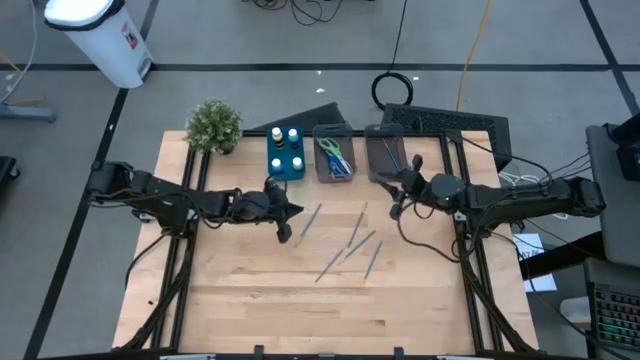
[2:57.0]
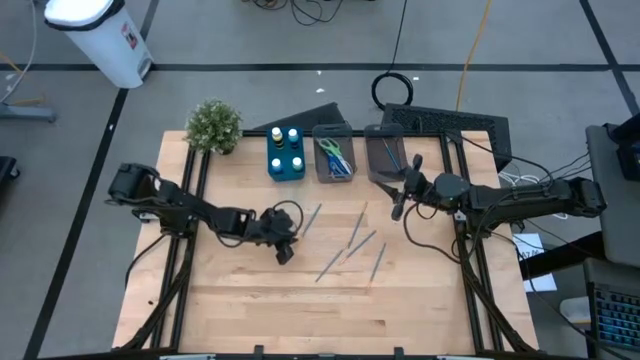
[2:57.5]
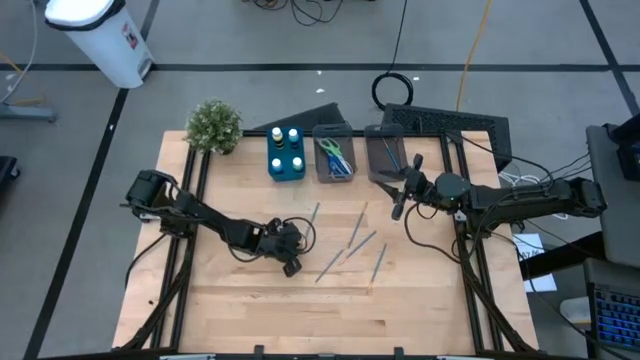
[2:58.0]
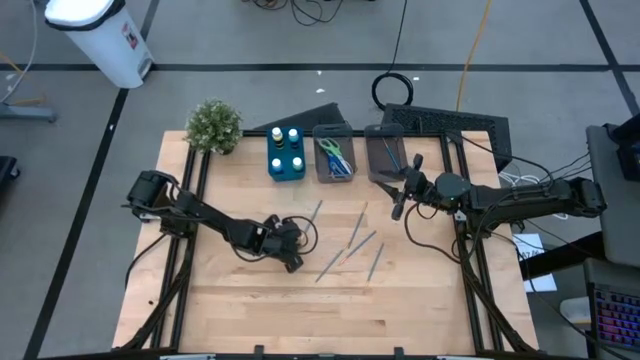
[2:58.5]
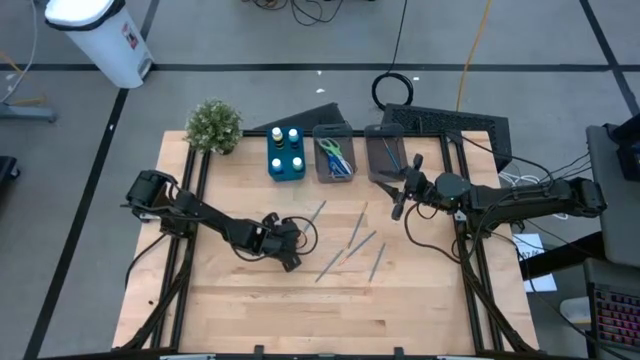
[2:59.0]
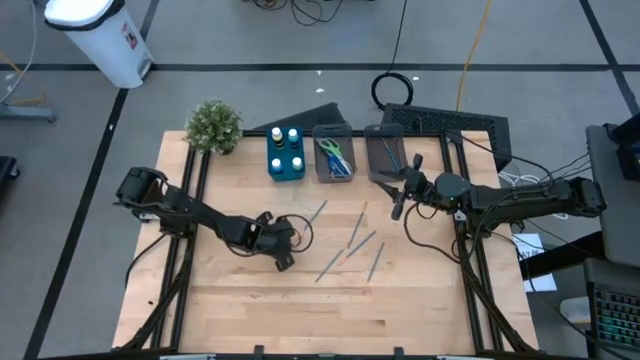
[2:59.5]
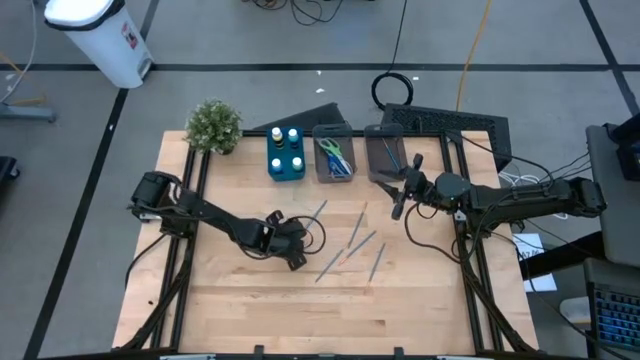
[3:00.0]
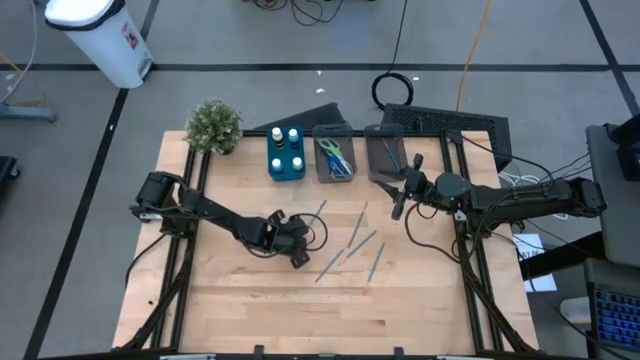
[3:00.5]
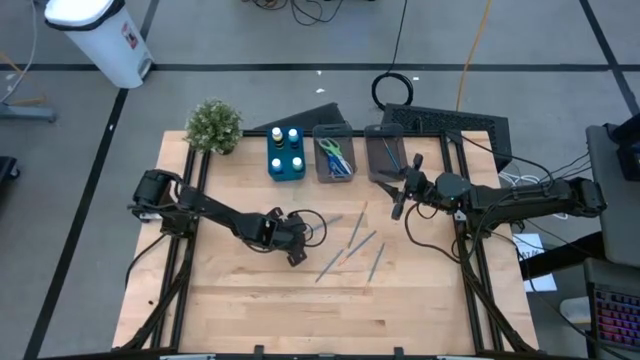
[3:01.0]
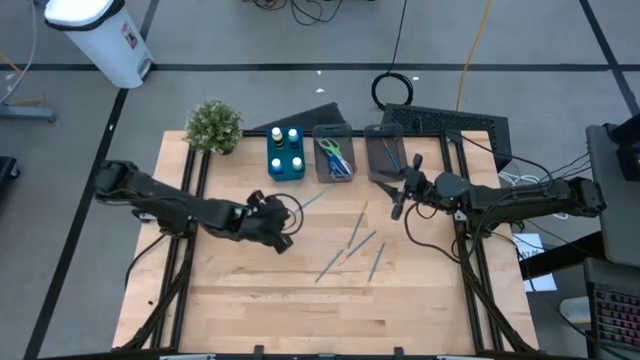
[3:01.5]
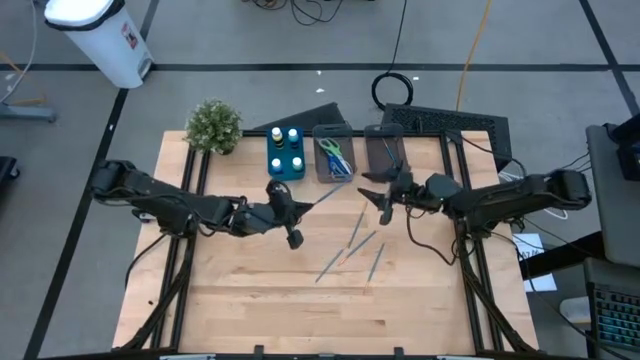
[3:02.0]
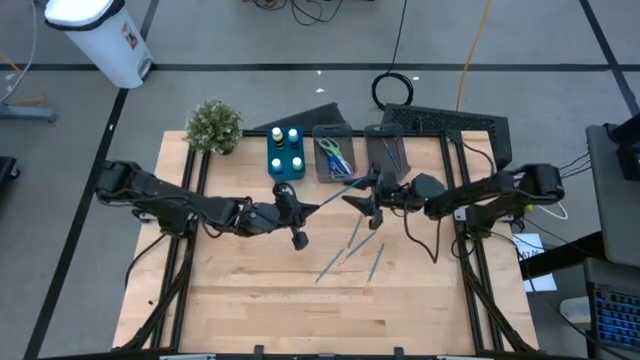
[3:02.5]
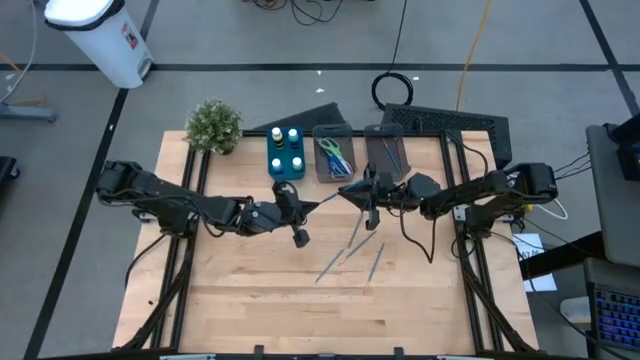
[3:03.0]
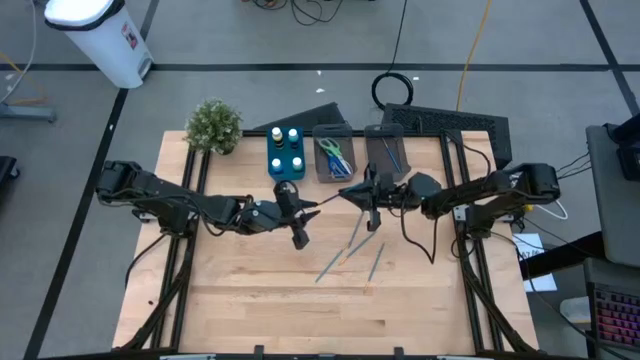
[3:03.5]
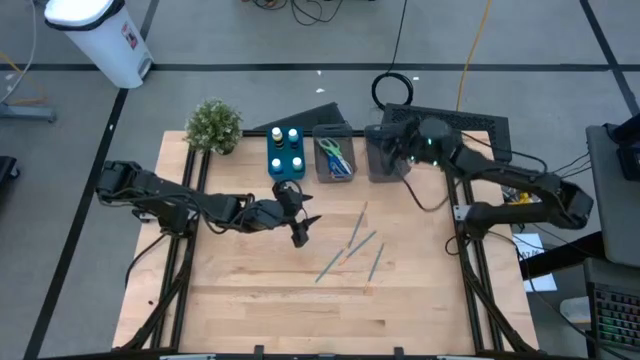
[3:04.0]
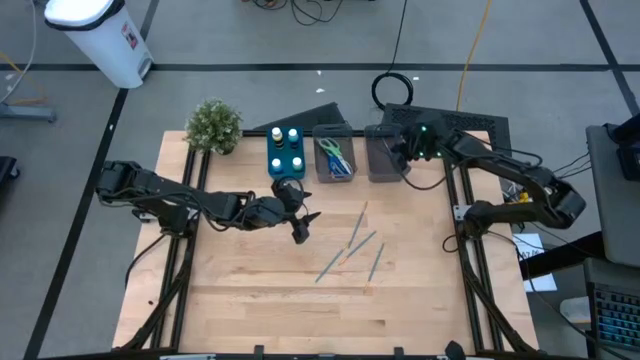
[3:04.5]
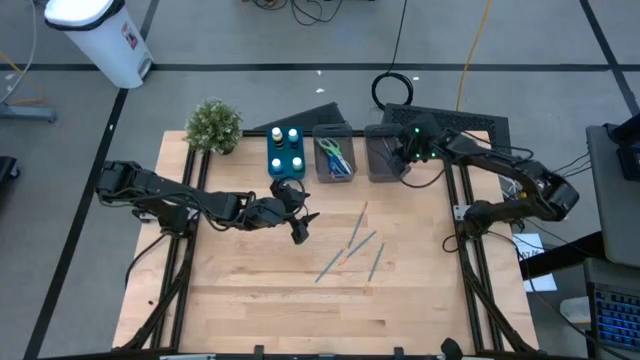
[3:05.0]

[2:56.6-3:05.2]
Task: Pick & Place Paint Supplies
Put the blue paint brush into the right black bin

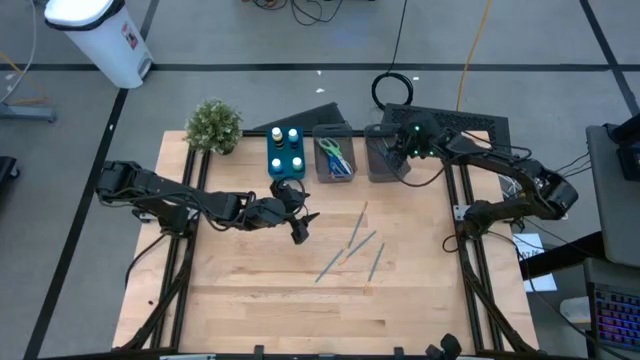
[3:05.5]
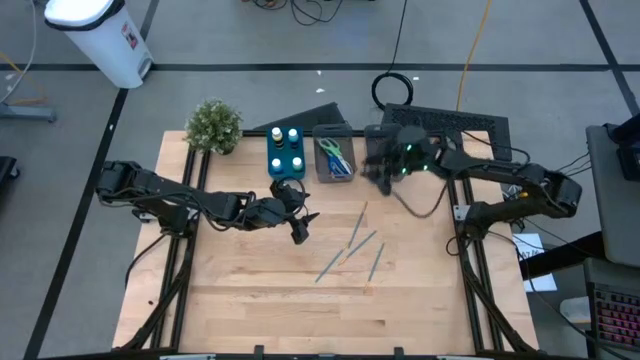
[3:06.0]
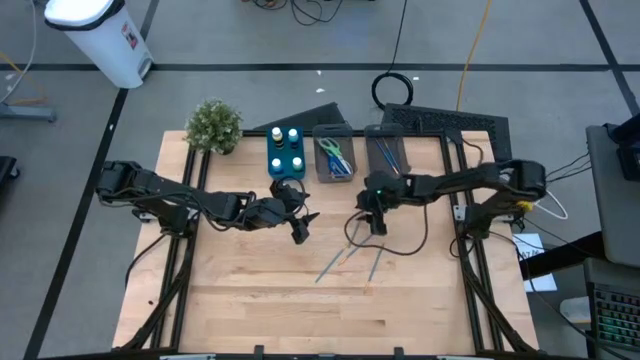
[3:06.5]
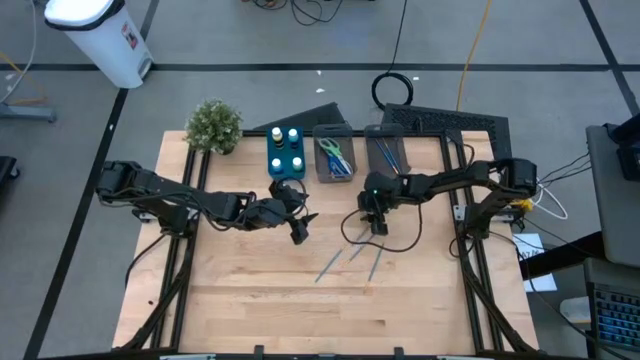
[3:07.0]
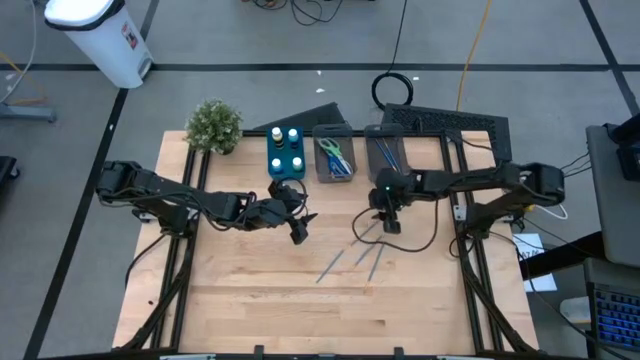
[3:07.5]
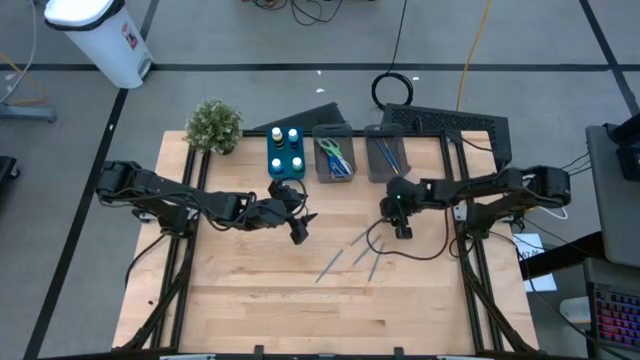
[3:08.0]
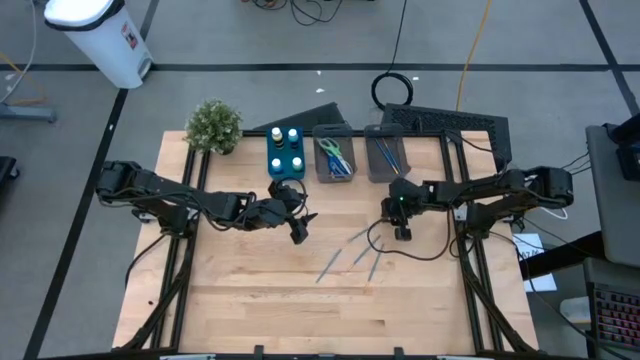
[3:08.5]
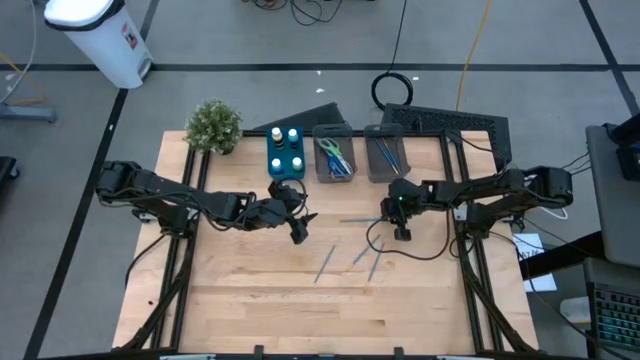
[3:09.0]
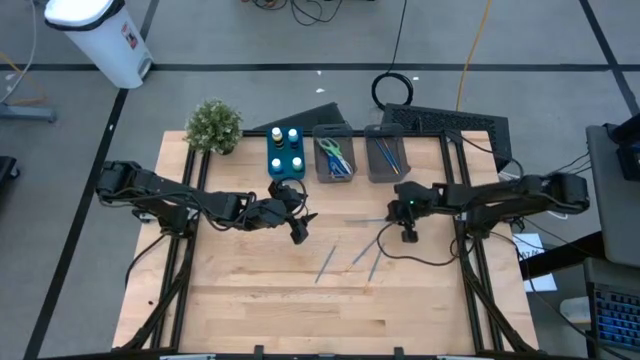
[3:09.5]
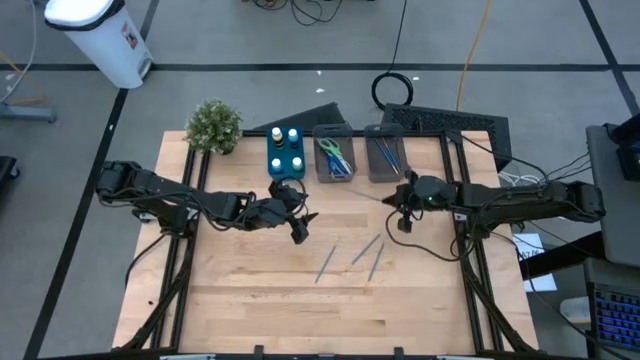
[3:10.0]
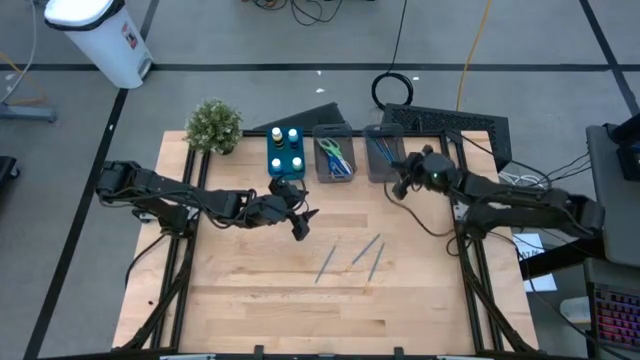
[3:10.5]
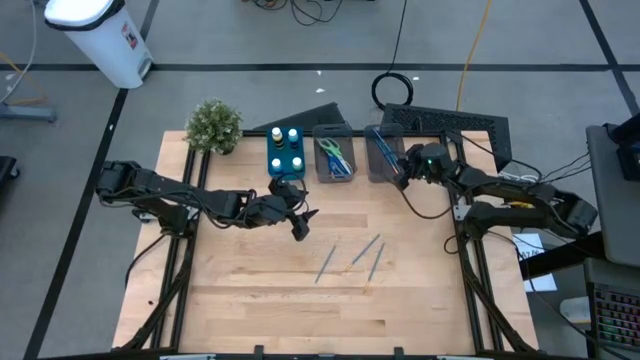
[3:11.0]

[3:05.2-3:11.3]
Put the blue paint brush into the right black bin

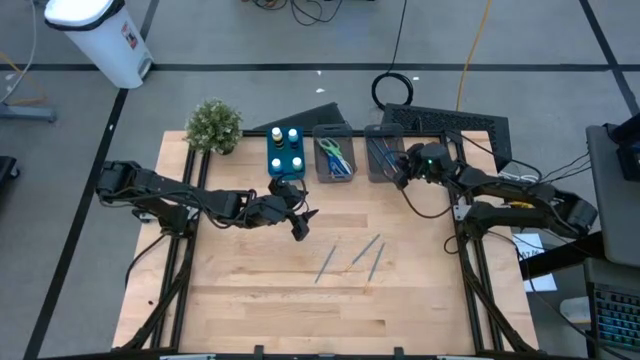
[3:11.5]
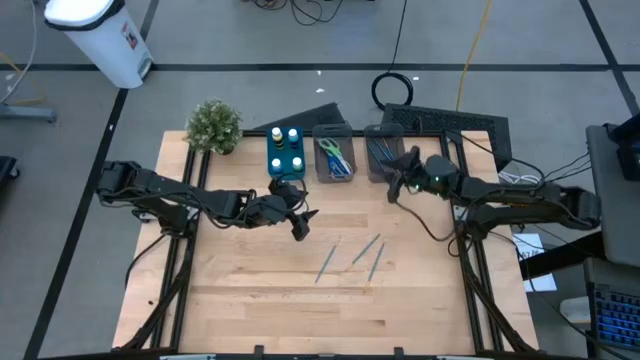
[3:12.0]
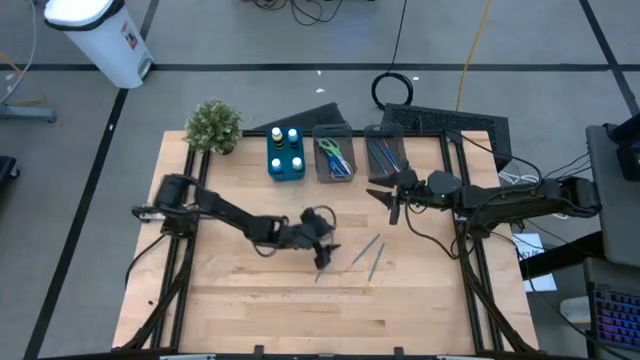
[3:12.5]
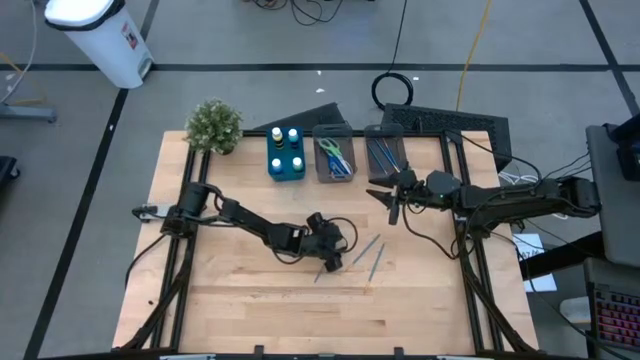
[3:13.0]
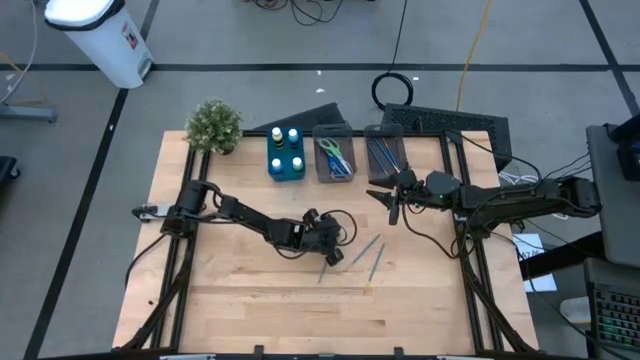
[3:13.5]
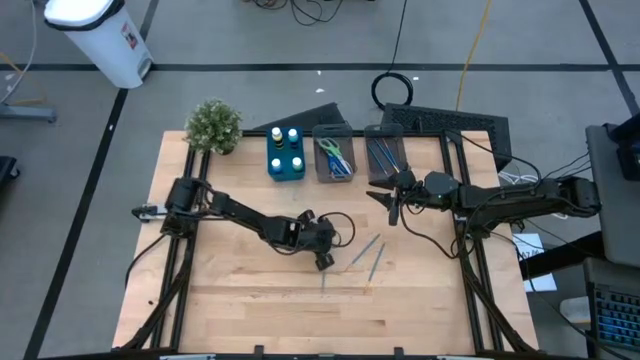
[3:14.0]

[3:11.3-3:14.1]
Put the blue paint brush into the right black bin

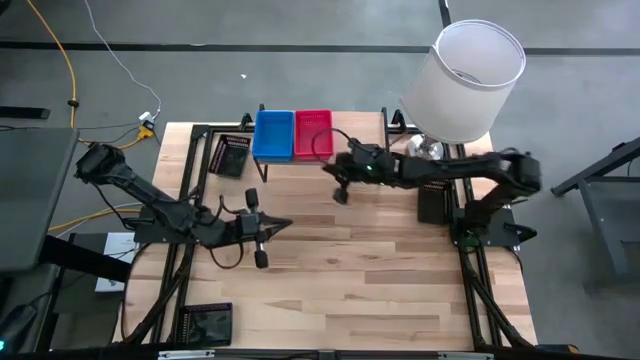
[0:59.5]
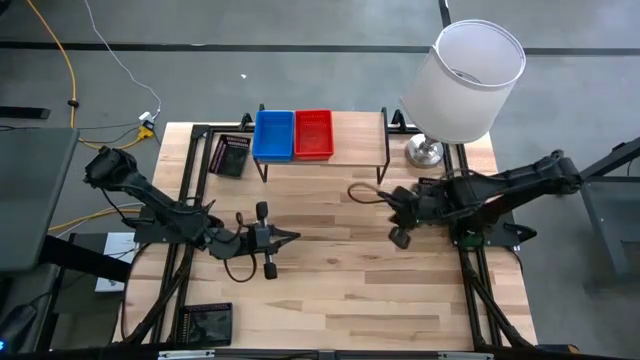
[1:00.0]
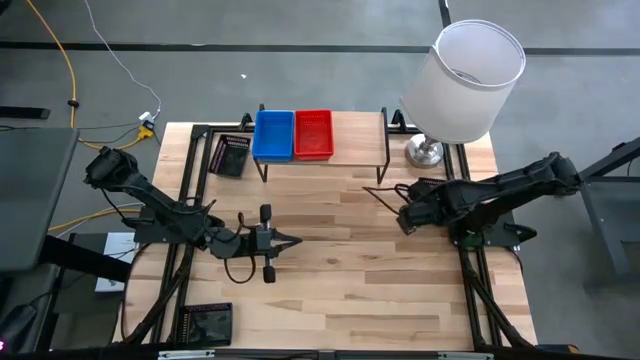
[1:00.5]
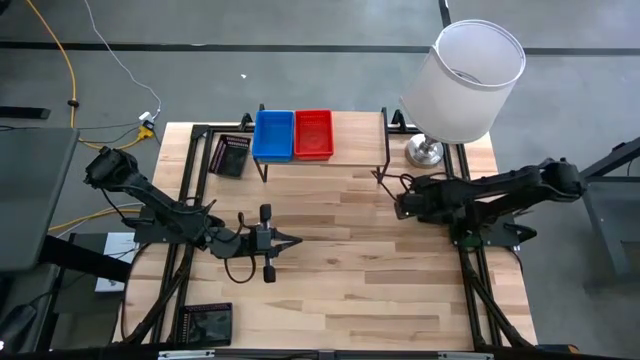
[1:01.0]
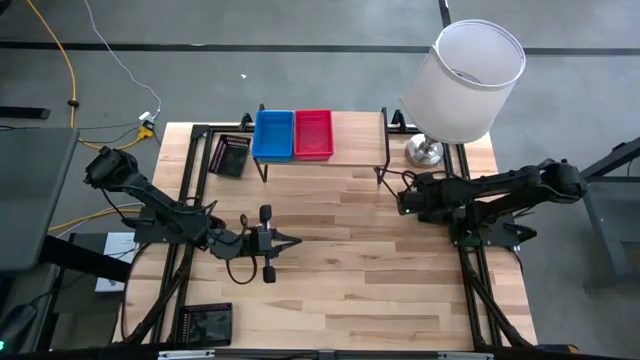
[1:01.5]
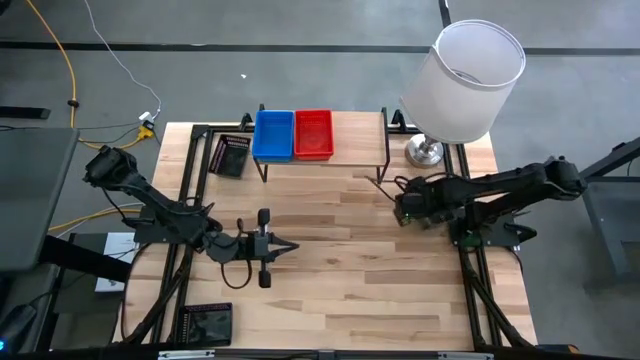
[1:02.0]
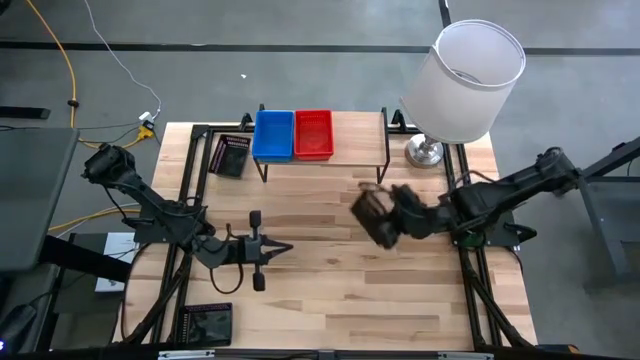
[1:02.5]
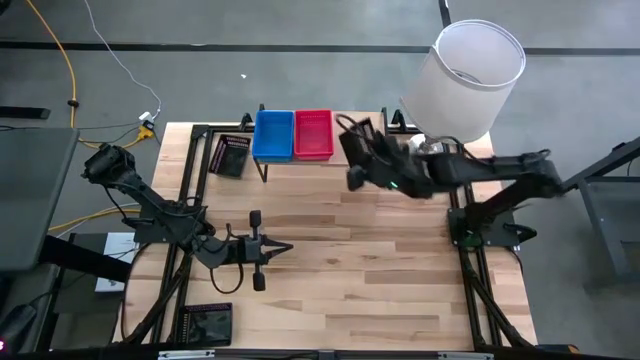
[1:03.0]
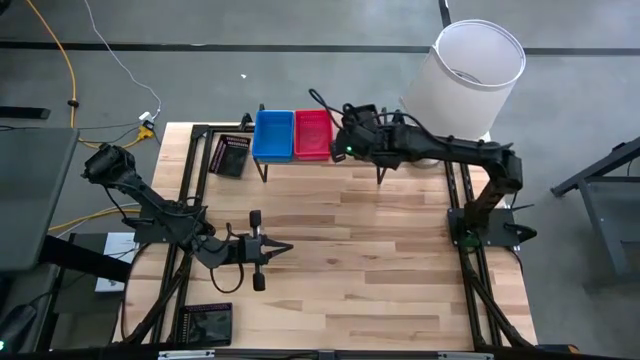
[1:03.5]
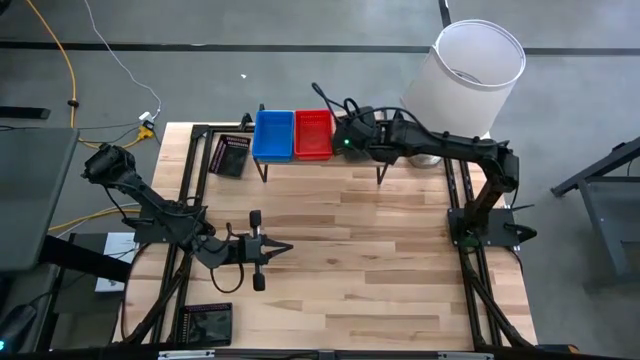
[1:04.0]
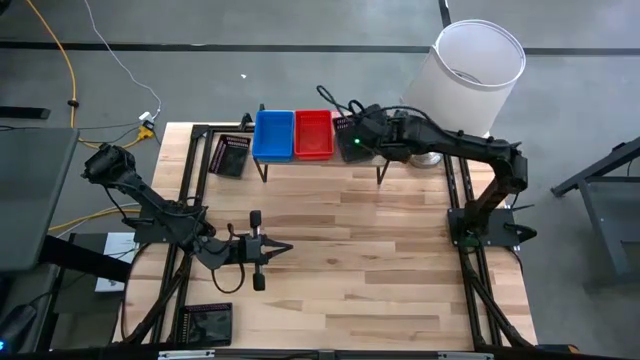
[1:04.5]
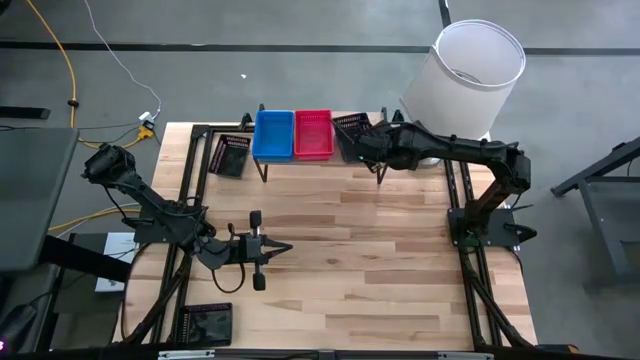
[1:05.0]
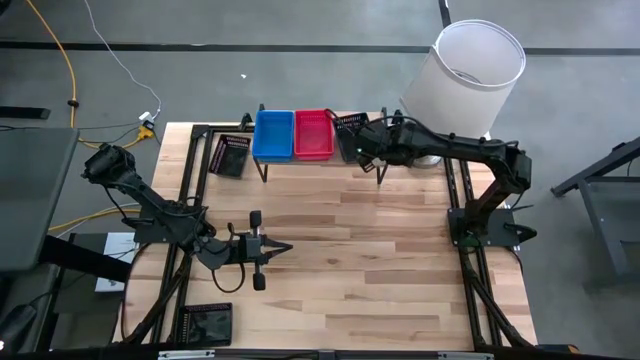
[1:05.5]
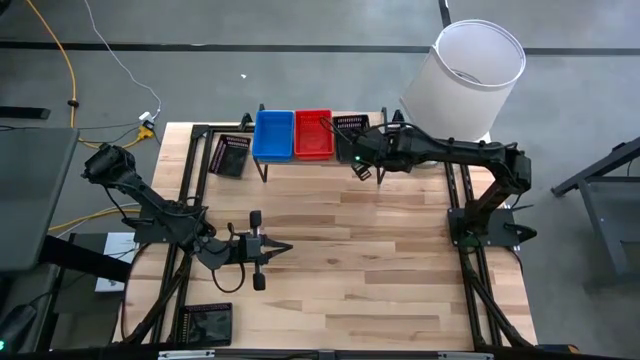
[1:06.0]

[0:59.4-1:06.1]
Task: Stack baskets on shelf by color
Put the middle black bin on the shelf
